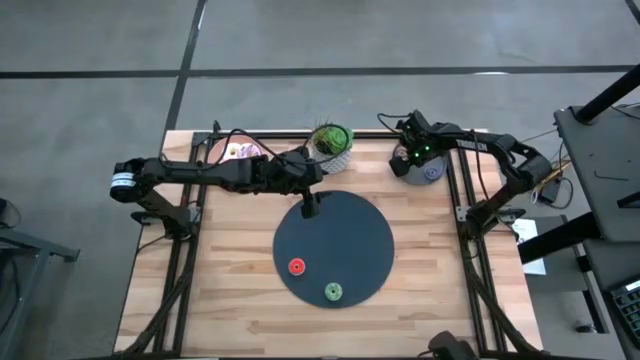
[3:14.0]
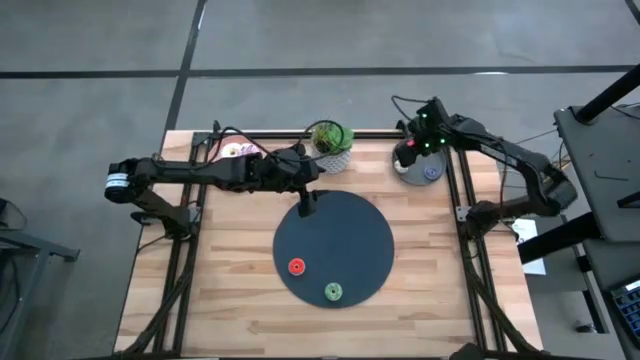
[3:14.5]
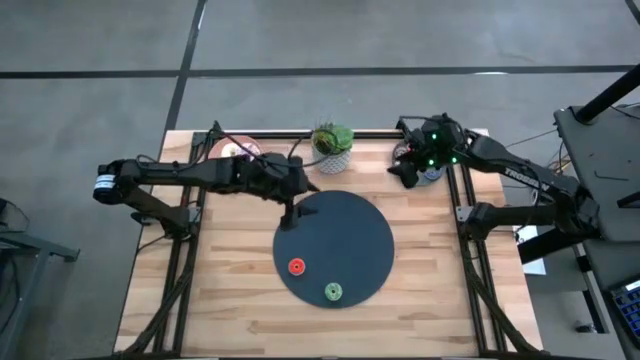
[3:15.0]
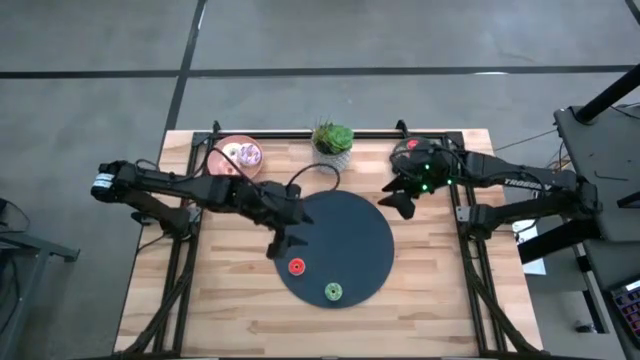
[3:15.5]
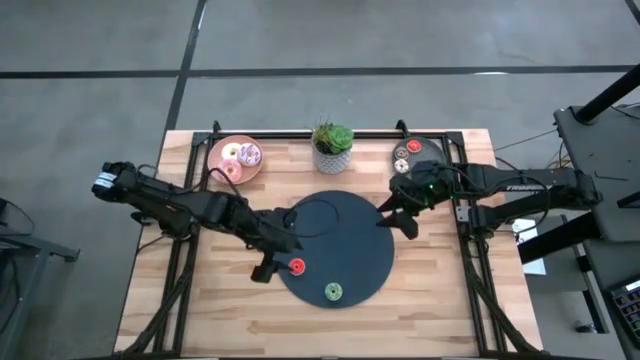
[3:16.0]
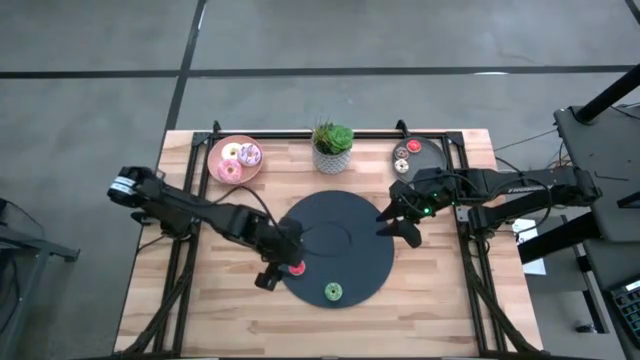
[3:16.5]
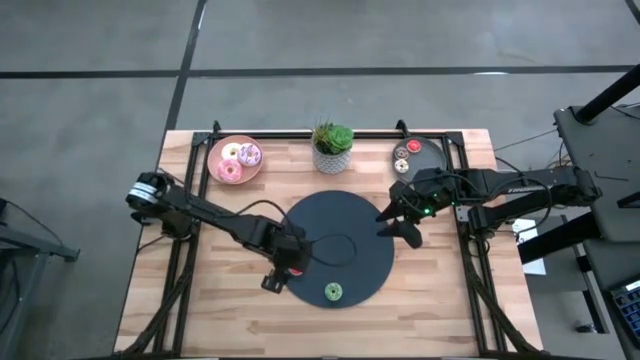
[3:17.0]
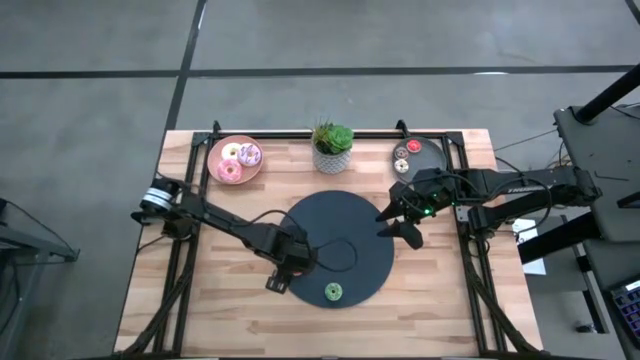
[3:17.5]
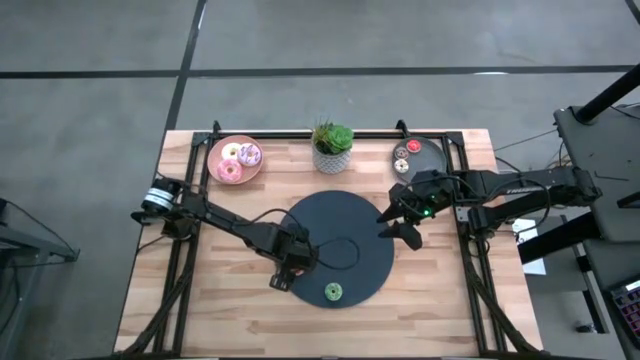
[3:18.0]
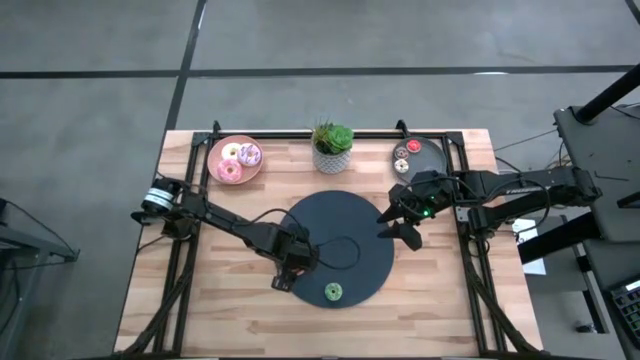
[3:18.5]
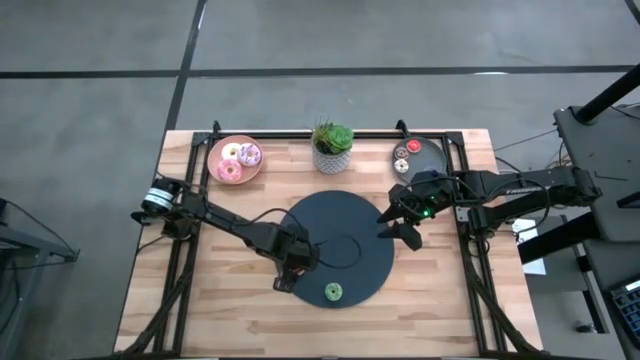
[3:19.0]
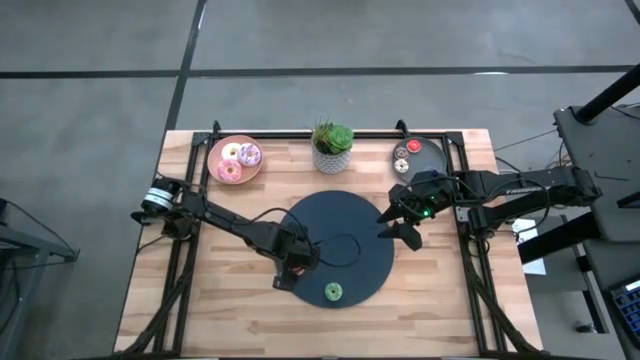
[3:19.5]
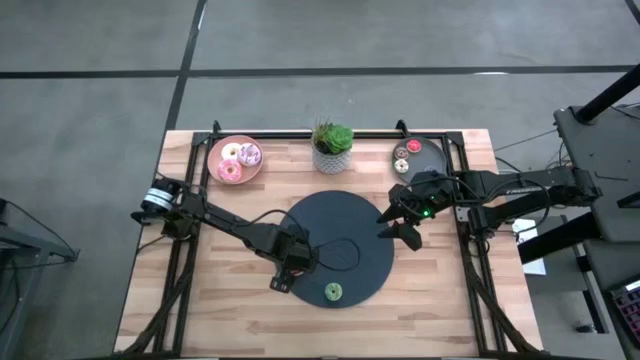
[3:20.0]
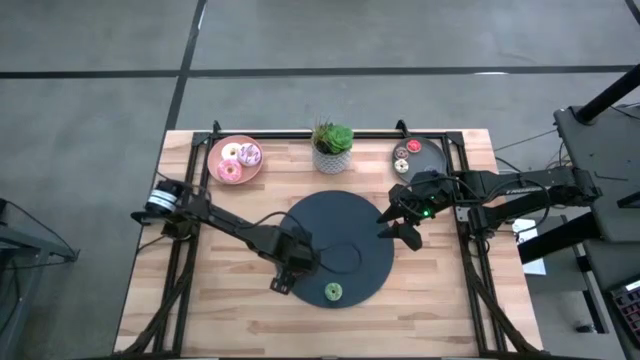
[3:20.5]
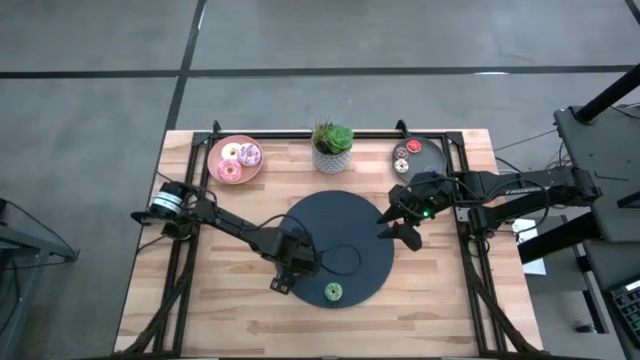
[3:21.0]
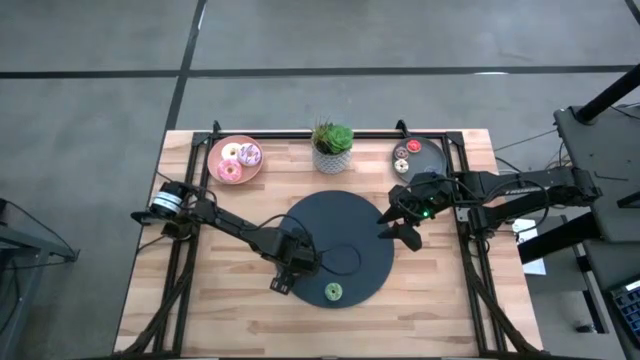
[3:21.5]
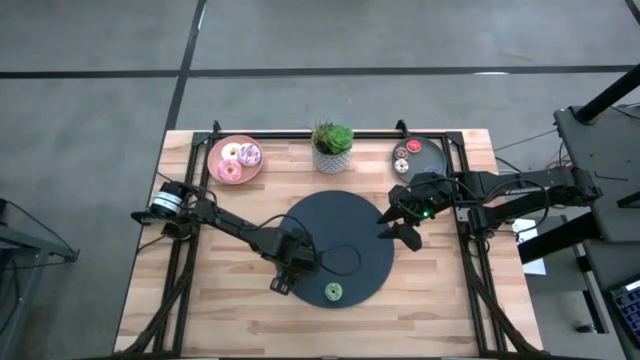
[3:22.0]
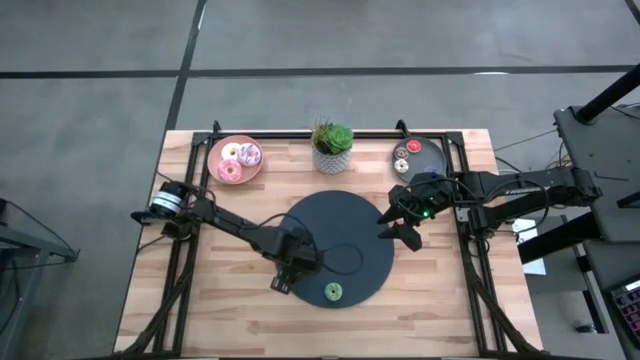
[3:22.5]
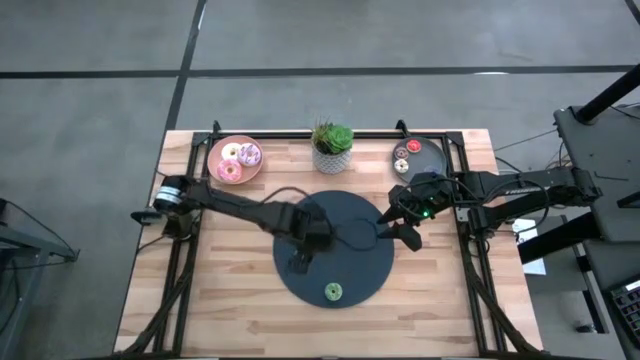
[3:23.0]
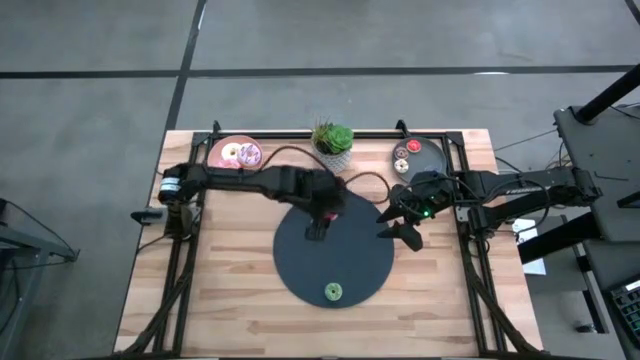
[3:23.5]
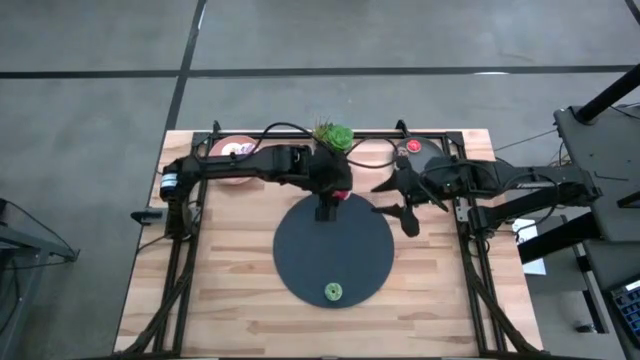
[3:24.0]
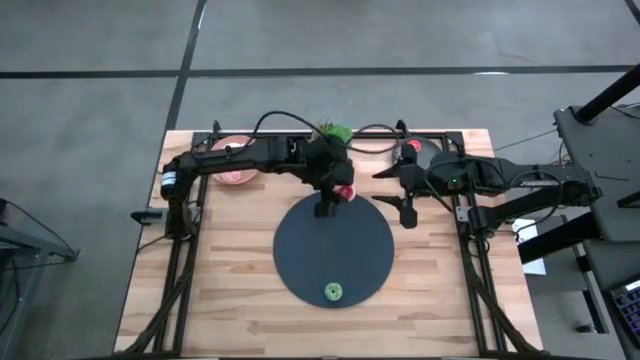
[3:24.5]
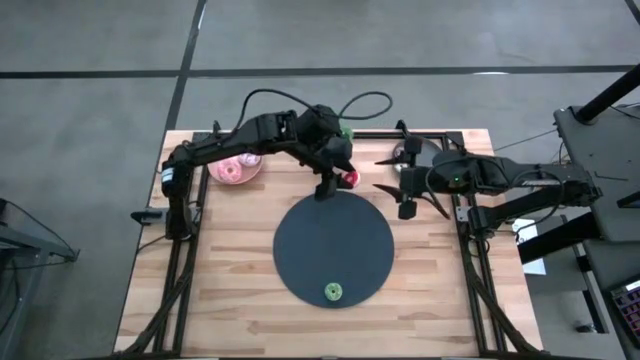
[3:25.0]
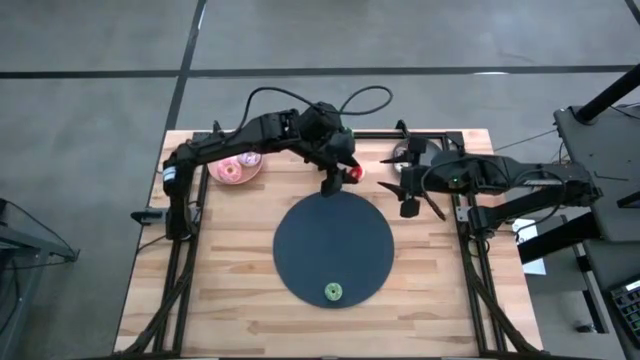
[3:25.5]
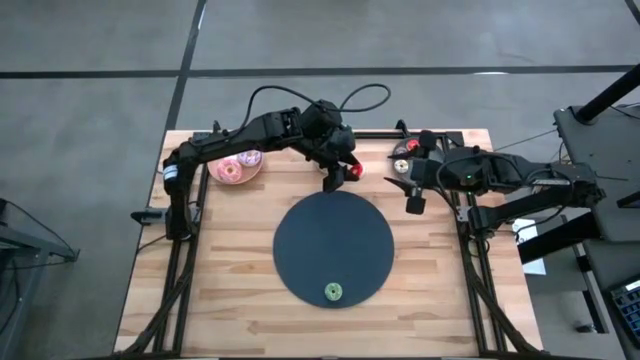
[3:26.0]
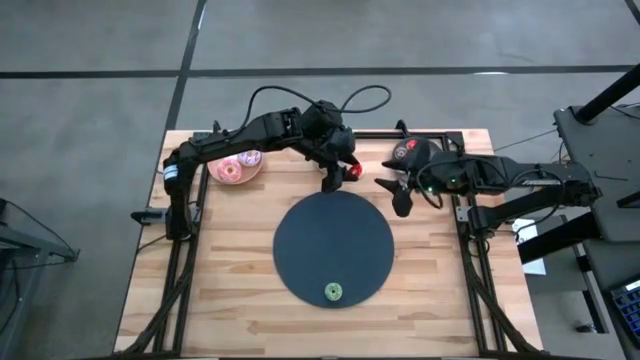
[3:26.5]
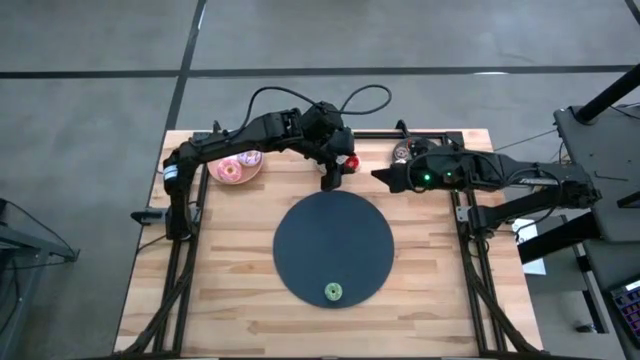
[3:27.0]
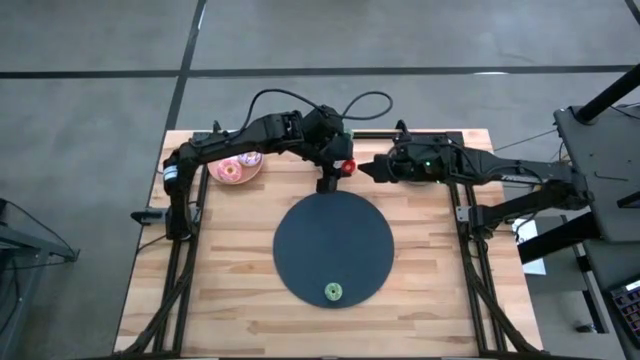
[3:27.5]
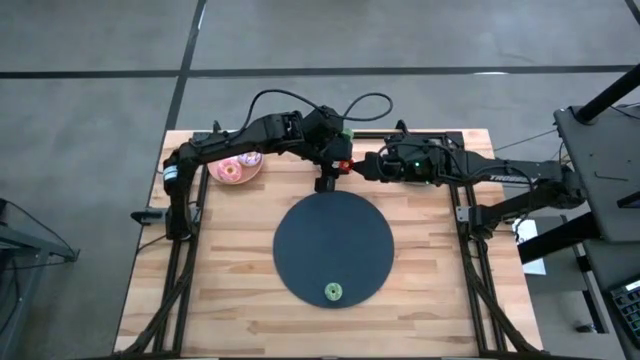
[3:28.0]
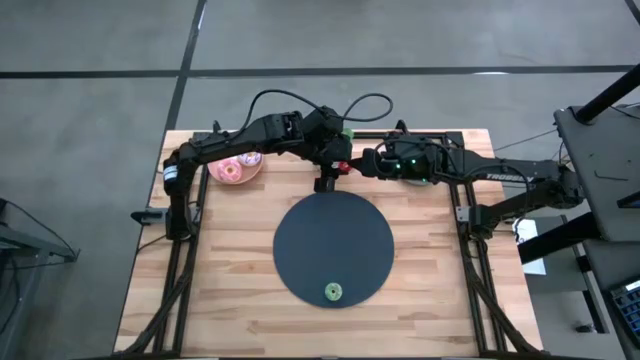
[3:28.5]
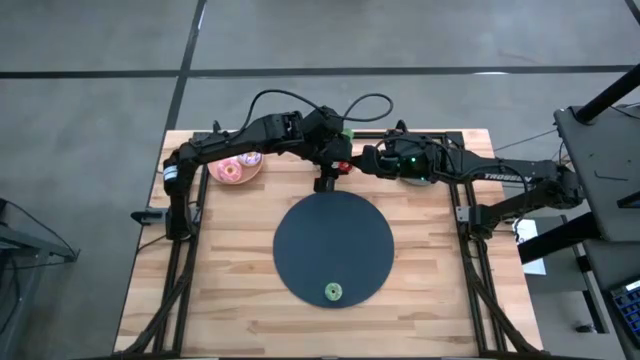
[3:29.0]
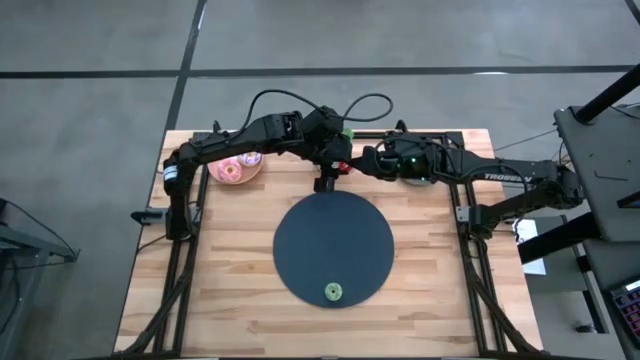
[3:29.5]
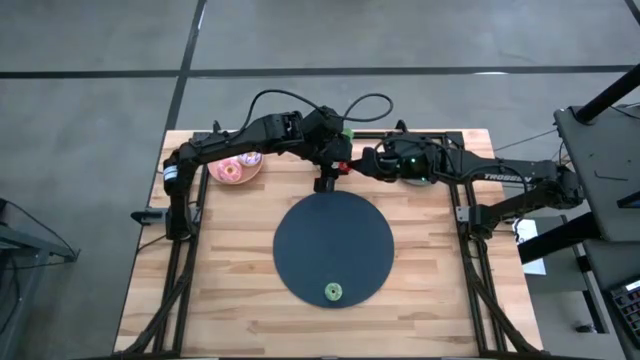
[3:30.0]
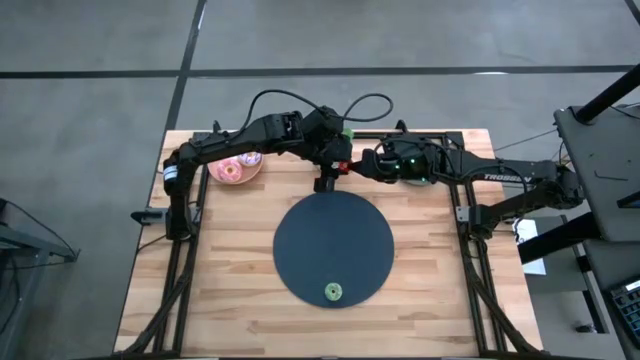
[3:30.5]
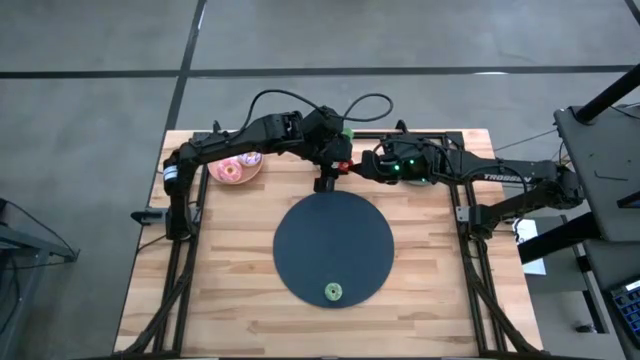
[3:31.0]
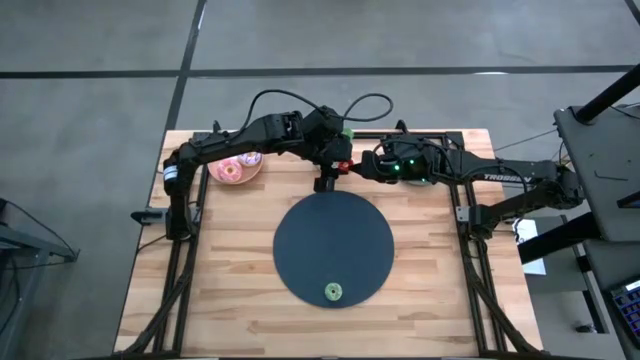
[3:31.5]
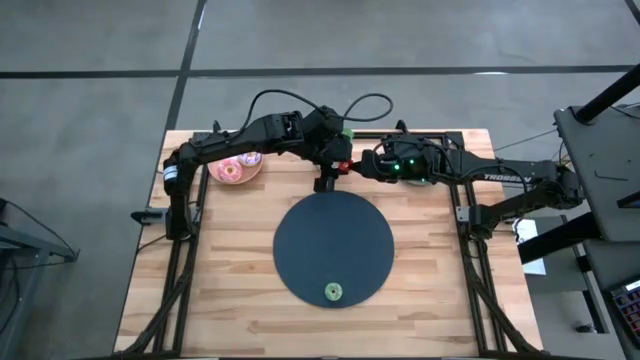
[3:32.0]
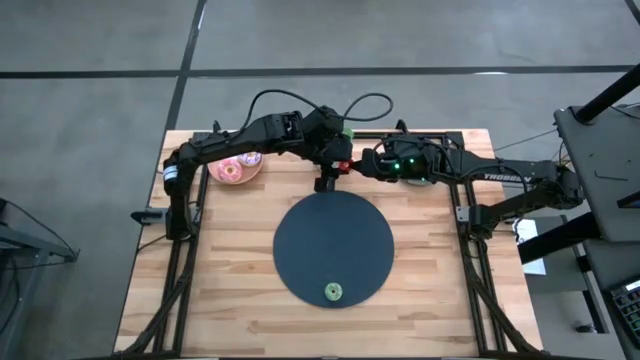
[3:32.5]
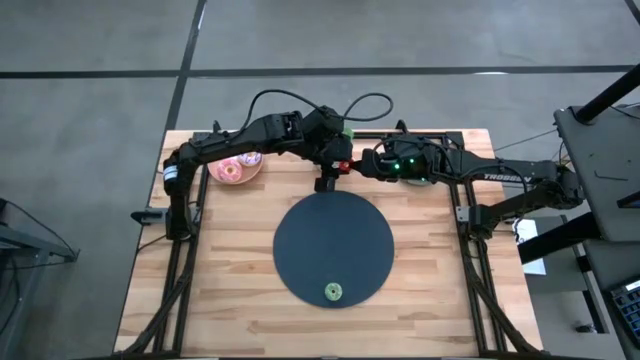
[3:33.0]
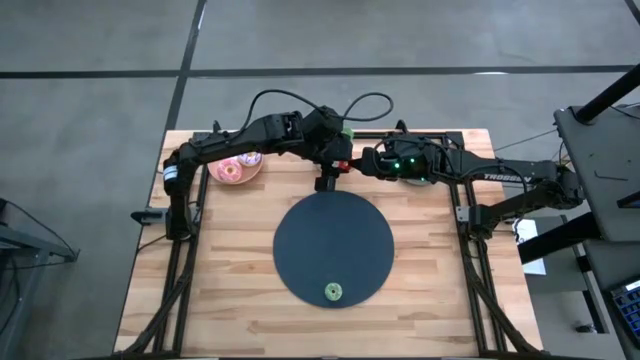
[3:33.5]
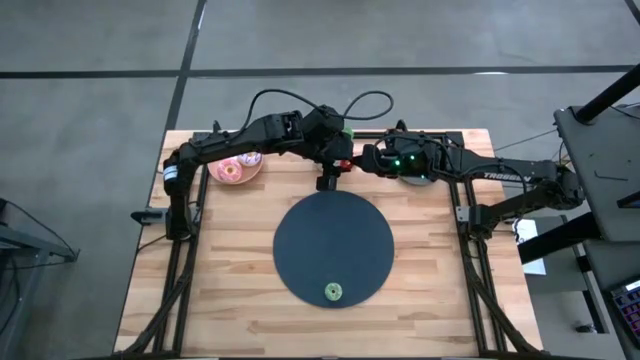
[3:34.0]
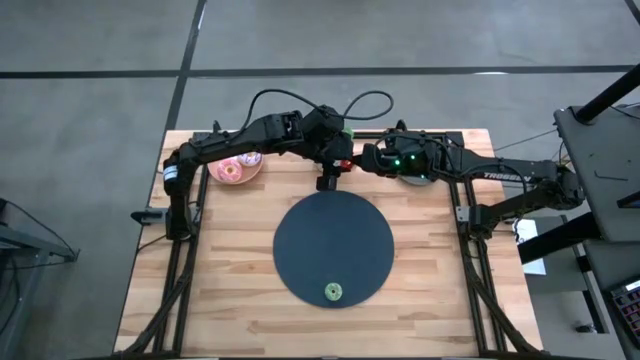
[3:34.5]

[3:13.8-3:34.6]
Task: Pick & Place donuts
Put the small red donut on the gray plate
